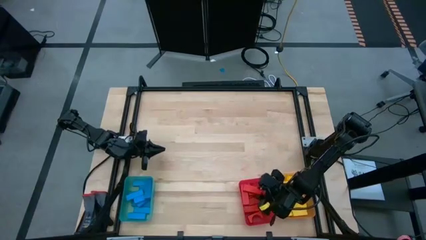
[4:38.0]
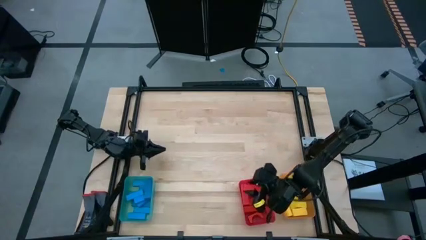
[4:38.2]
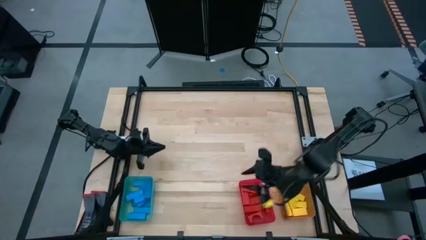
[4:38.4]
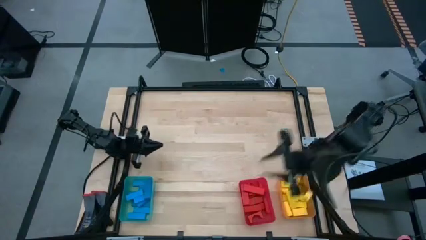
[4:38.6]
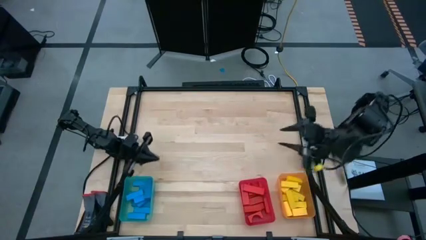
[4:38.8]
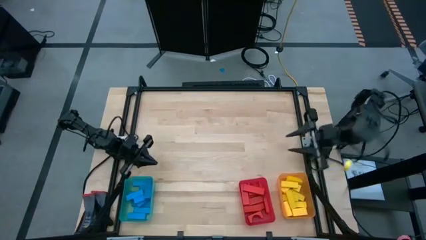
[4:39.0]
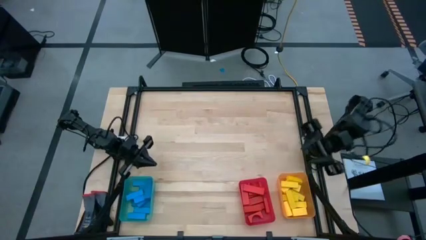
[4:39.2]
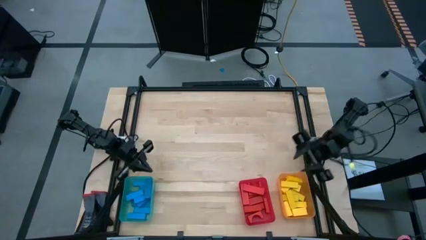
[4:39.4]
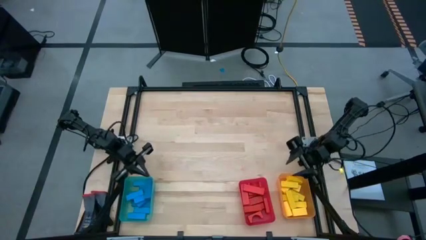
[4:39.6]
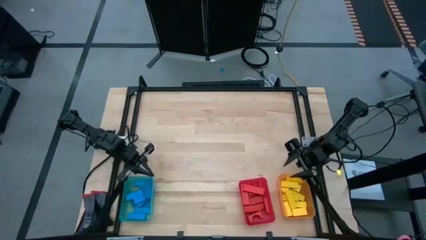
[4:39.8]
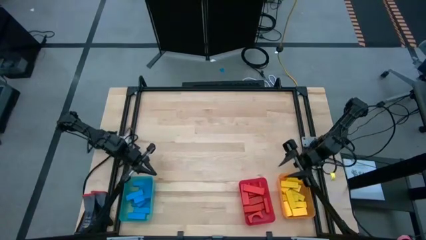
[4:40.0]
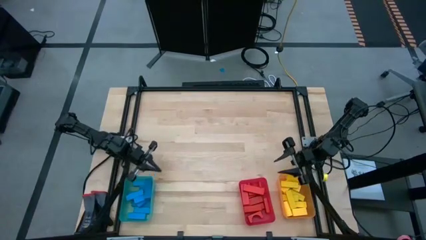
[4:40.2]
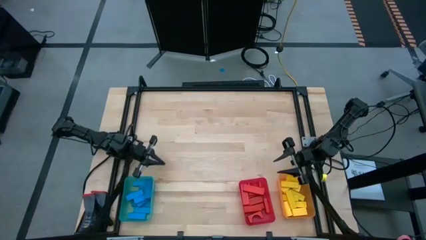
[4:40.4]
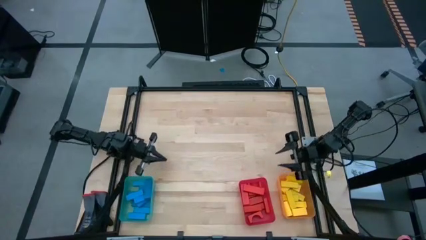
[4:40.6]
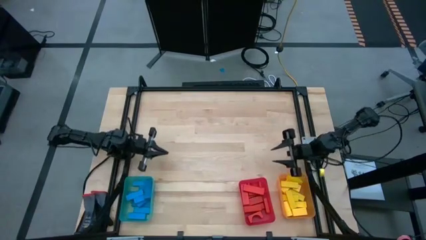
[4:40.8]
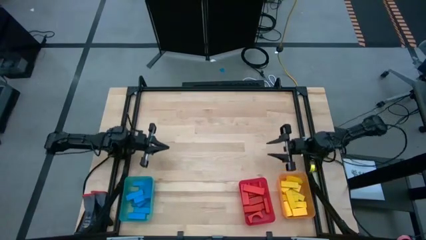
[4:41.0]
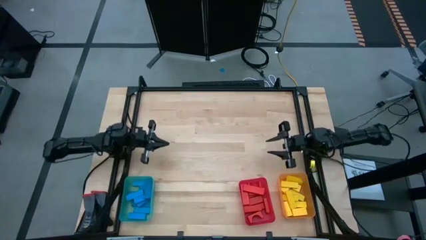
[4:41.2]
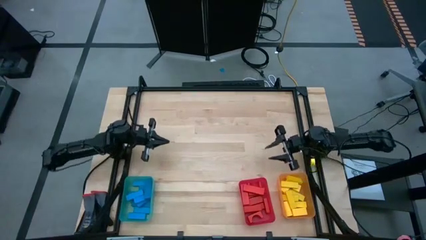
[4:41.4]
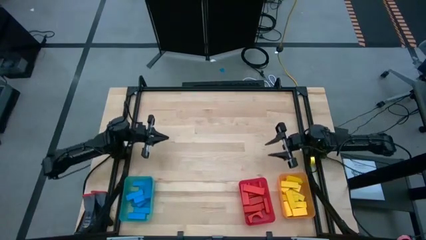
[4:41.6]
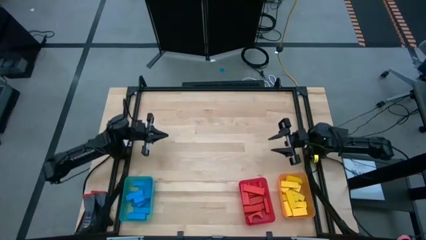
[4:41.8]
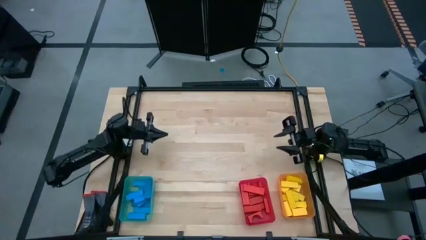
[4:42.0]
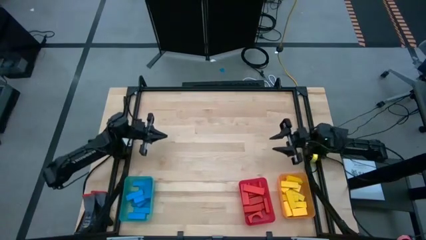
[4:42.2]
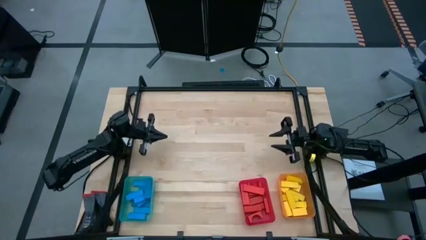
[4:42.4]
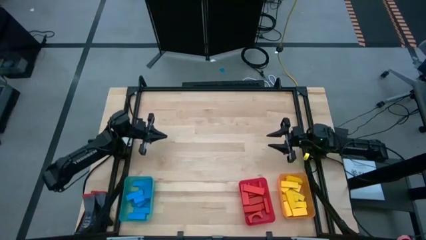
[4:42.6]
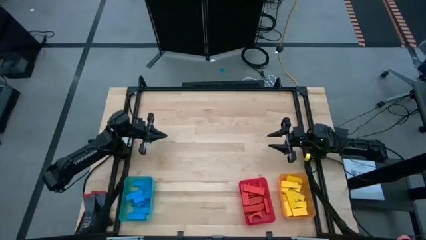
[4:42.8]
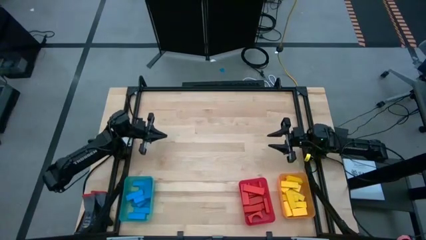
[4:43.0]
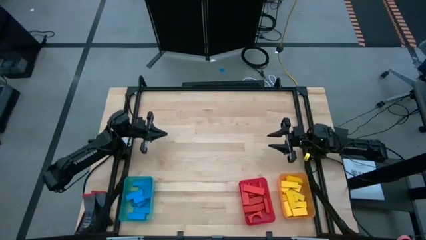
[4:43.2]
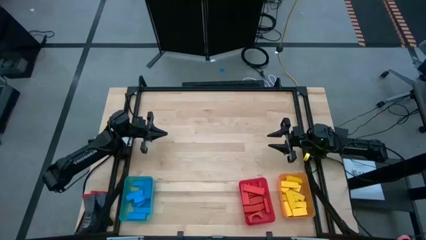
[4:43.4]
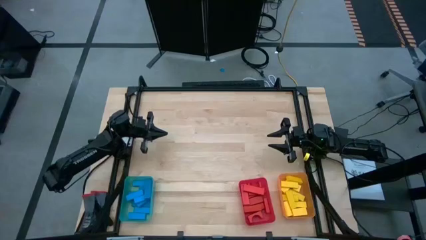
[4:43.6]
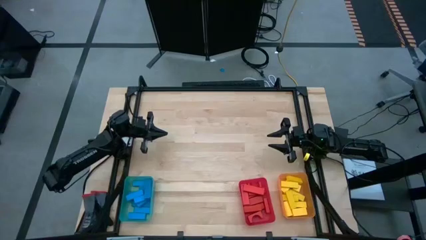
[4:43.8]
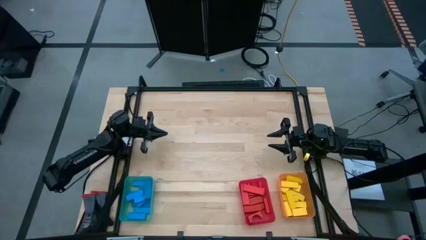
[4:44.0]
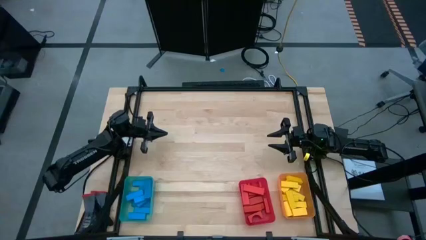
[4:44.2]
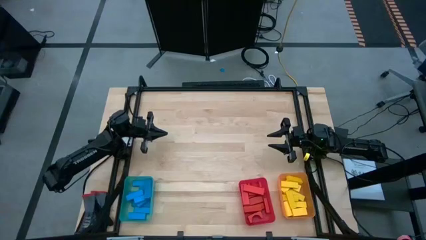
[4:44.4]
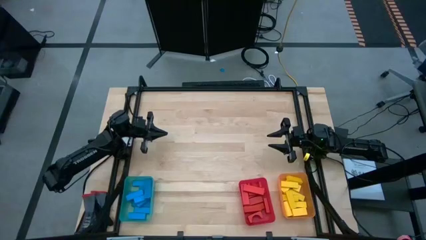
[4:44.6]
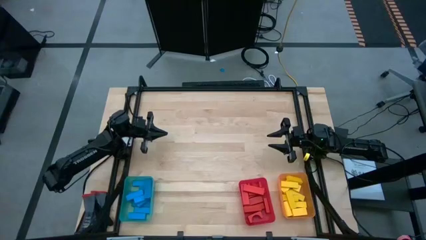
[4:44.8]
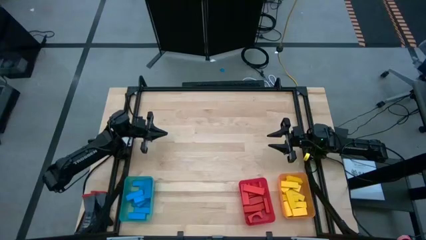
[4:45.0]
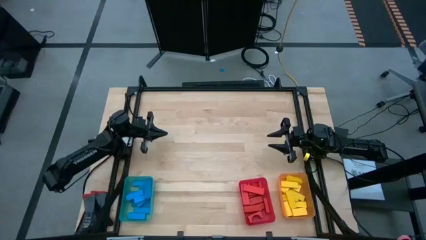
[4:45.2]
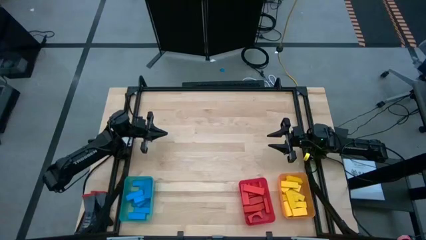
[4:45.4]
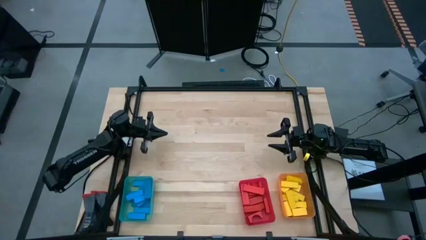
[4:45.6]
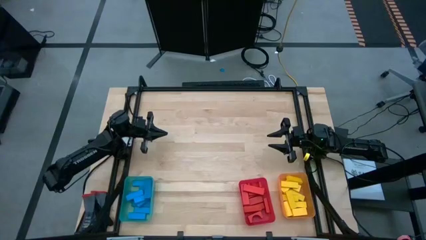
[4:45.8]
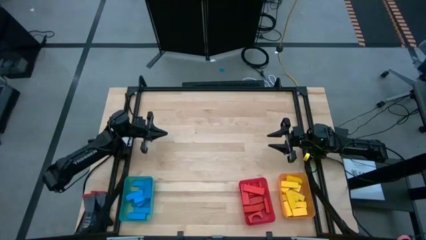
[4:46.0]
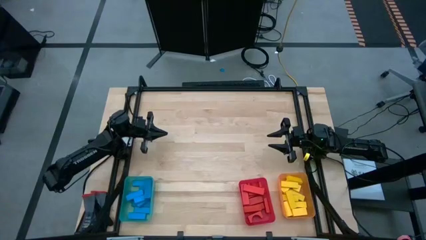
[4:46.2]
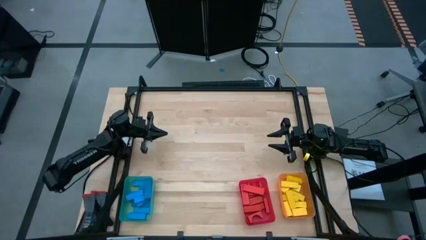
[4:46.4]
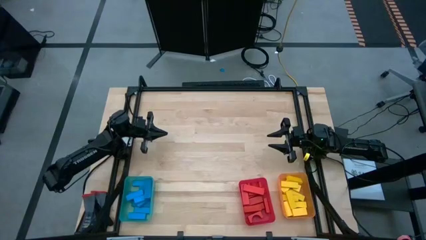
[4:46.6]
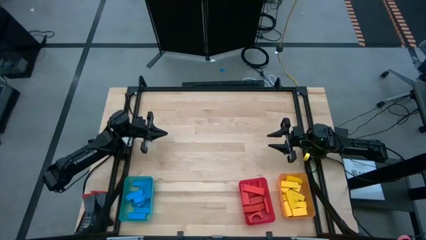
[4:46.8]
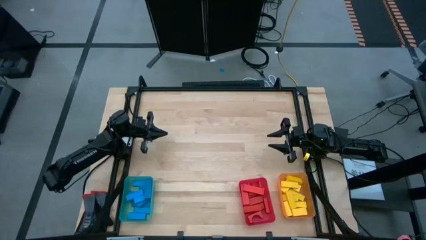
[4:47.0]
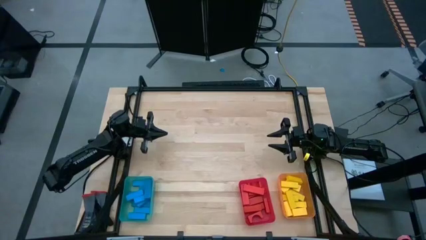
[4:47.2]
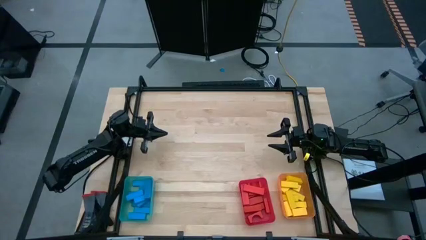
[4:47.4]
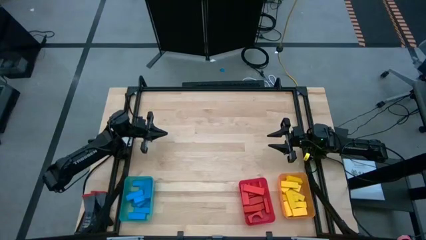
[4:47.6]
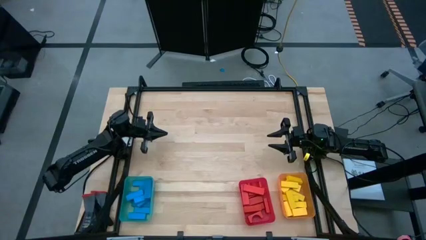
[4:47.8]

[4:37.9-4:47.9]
Task: Sort blocks
Return to Home Position

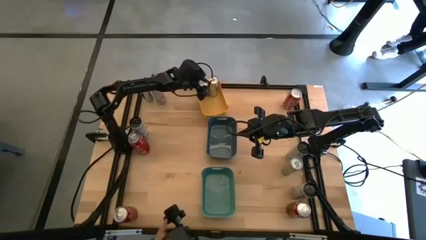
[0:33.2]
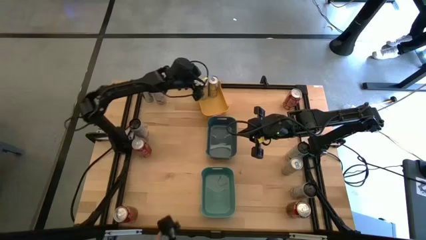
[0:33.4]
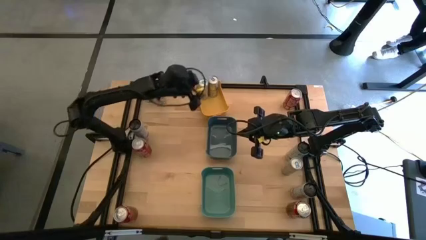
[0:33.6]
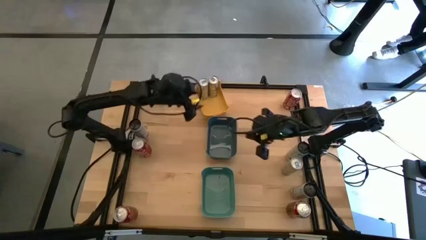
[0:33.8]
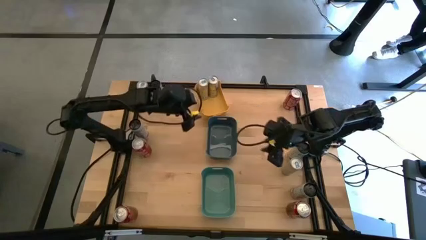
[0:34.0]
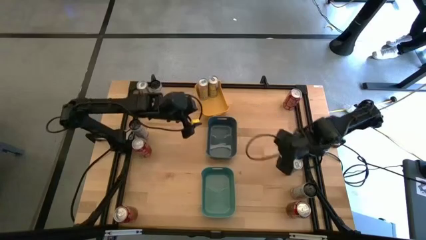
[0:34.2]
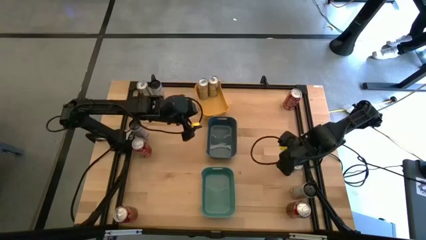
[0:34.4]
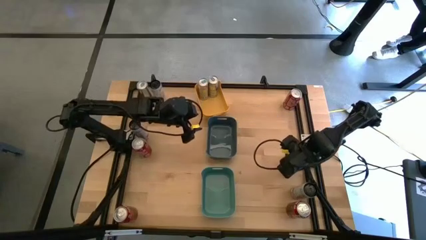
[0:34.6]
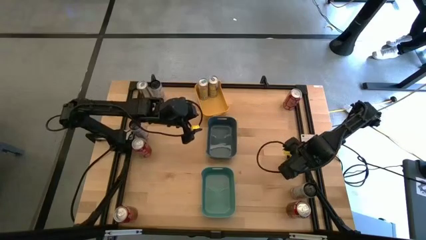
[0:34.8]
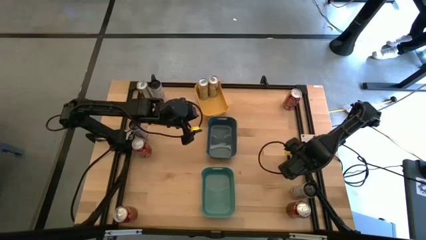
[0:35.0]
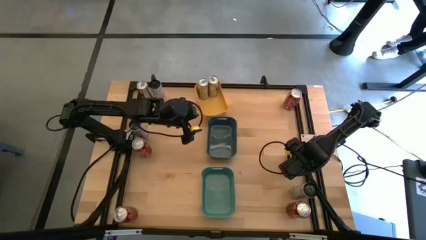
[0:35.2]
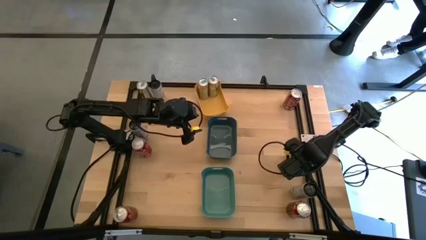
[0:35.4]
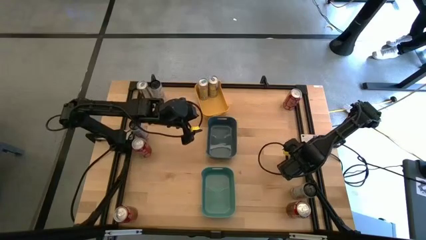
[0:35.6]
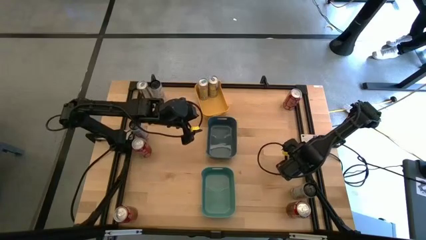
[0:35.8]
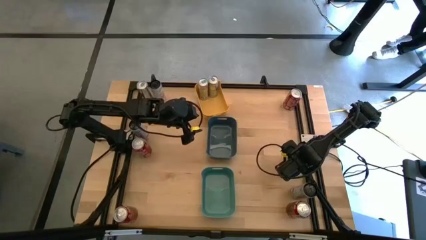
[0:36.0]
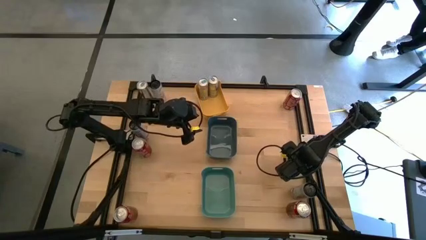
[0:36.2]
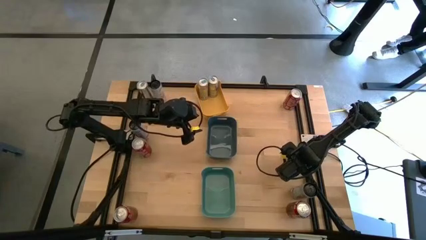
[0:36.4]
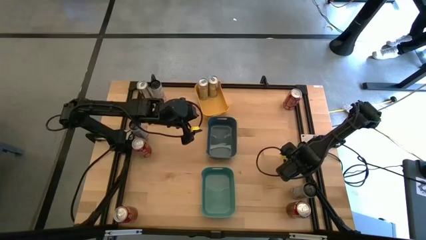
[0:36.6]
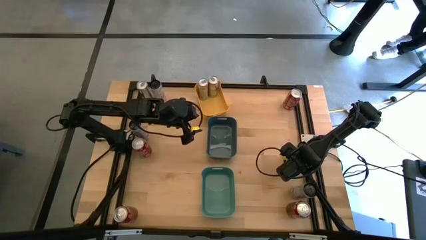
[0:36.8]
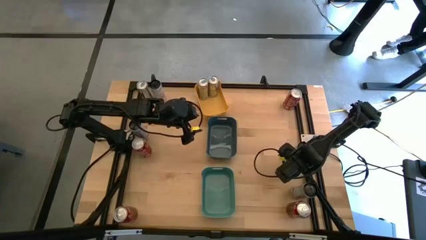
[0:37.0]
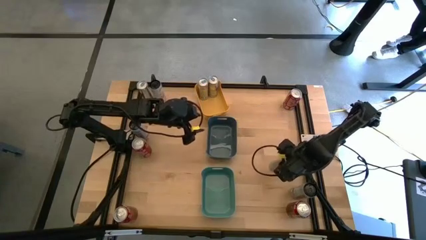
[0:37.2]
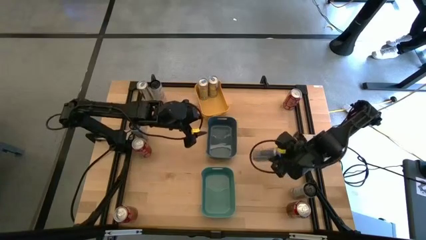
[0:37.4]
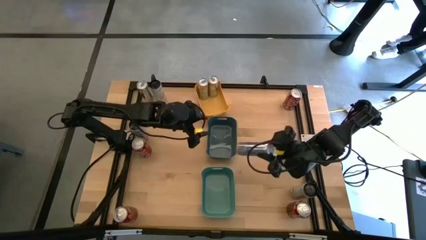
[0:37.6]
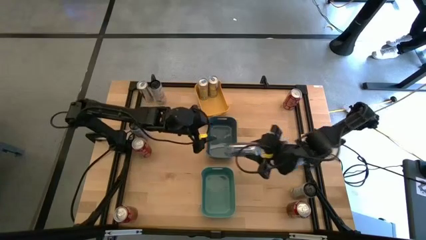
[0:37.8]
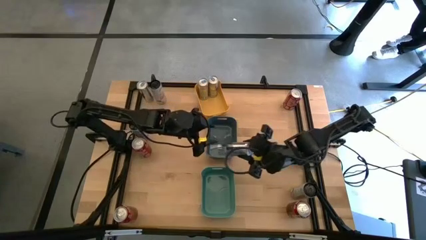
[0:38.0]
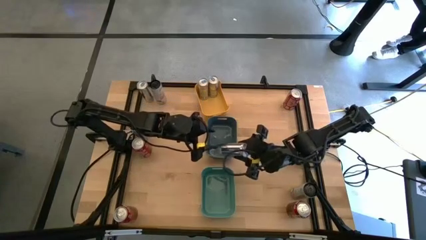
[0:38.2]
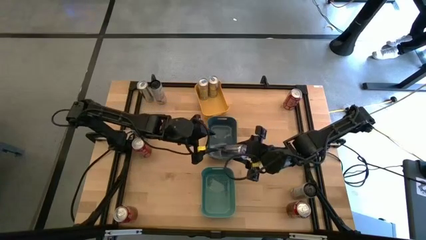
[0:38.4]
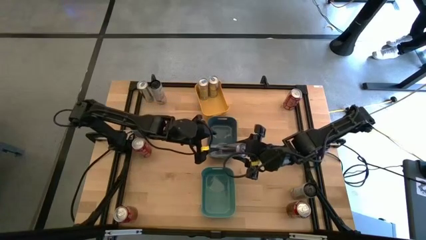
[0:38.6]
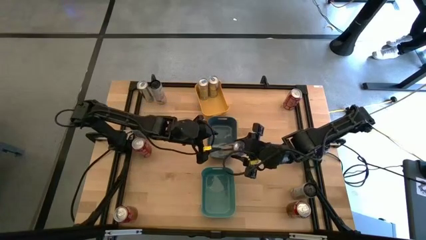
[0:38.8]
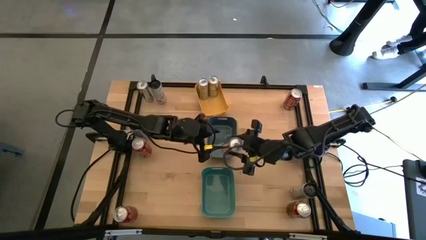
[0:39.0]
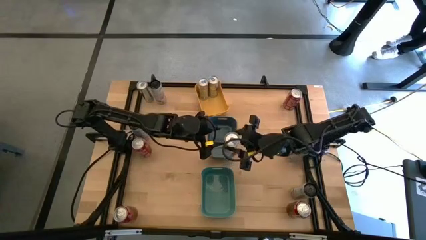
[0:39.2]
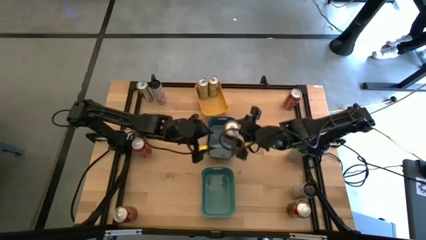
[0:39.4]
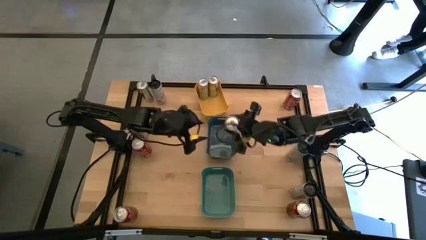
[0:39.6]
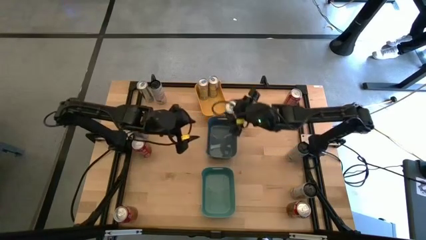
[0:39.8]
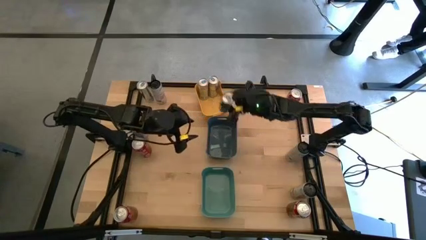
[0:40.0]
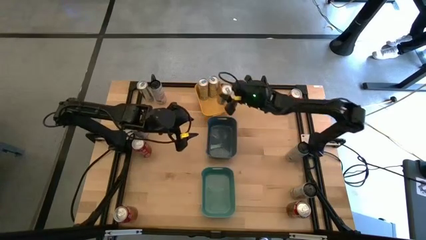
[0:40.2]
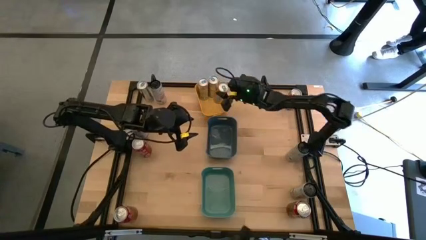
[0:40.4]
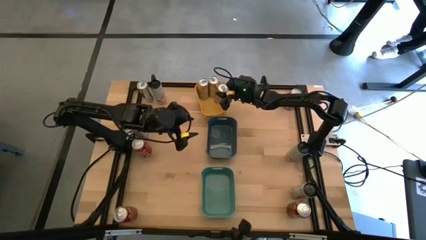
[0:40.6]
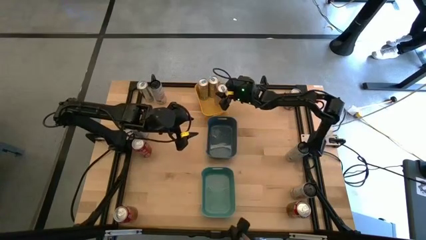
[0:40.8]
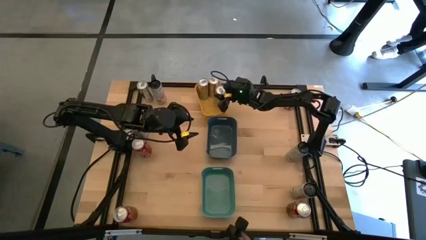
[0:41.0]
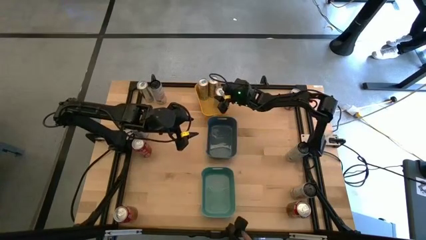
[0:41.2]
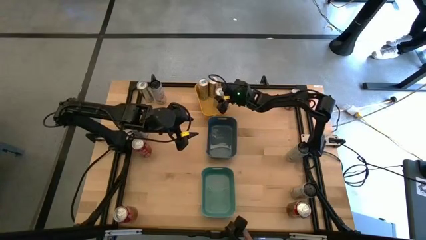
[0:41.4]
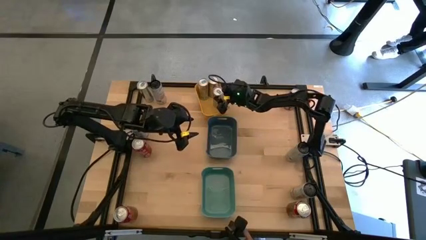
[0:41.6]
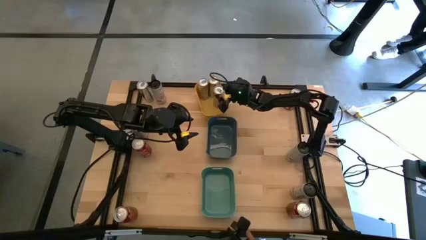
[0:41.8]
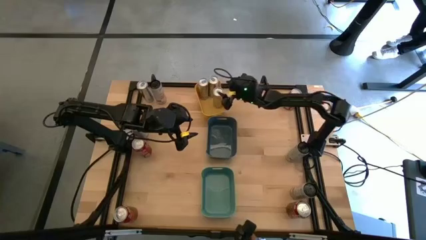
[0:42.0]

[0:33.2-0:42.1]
Task: Sort soda cans
Put the bottom blue soda can into the yellow bin
